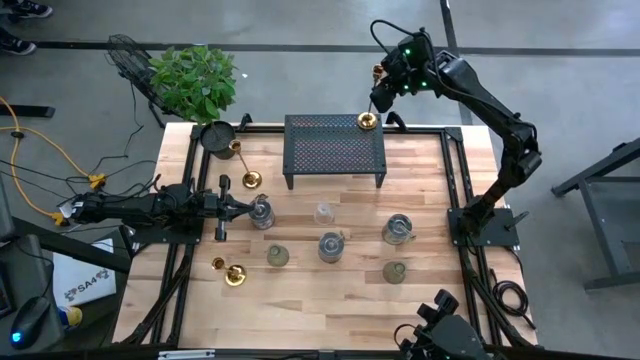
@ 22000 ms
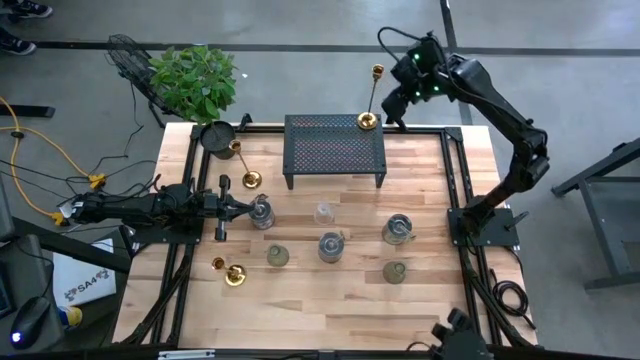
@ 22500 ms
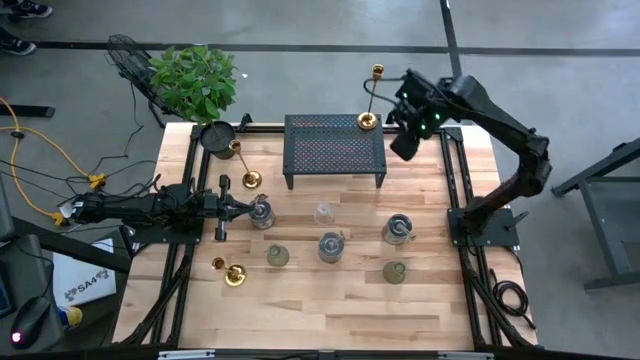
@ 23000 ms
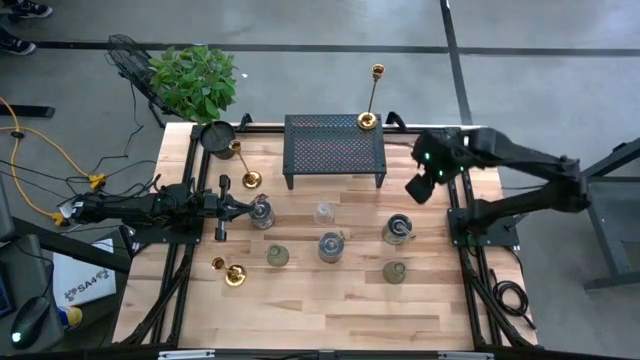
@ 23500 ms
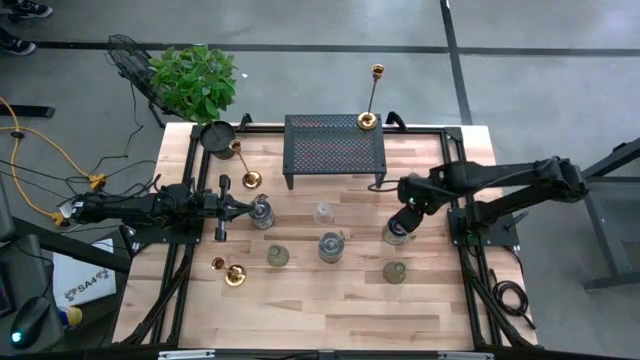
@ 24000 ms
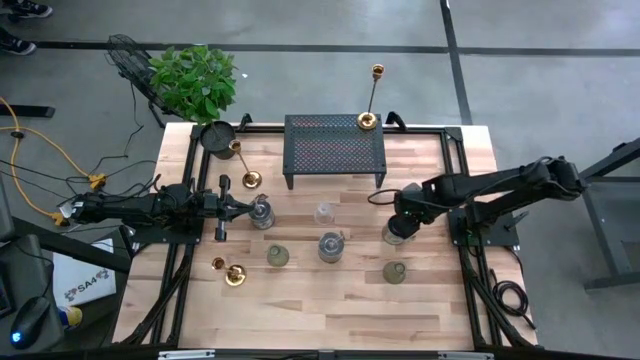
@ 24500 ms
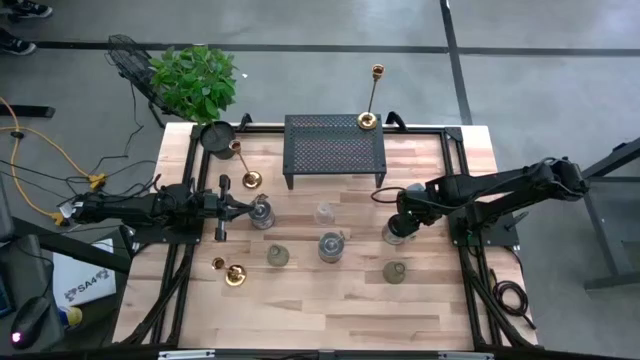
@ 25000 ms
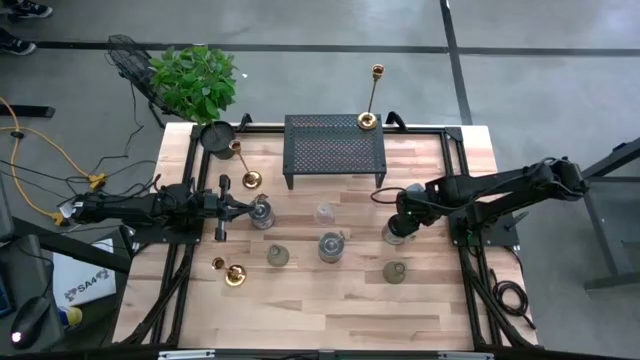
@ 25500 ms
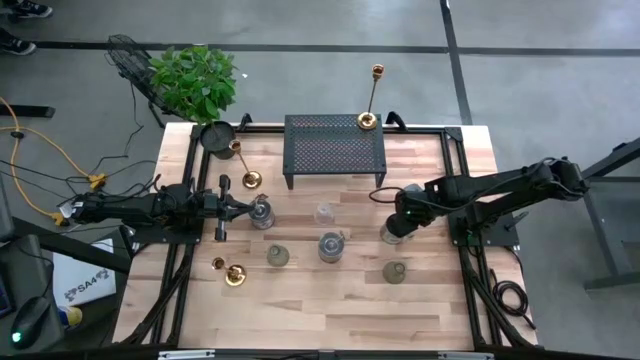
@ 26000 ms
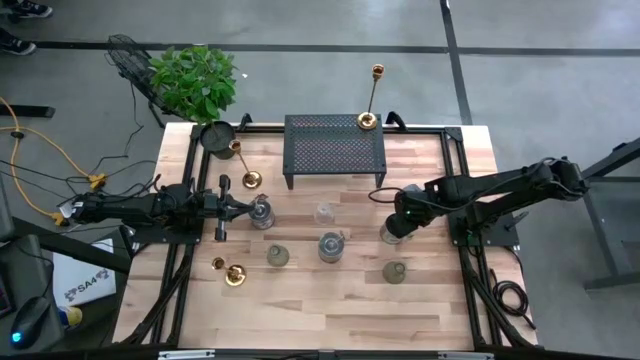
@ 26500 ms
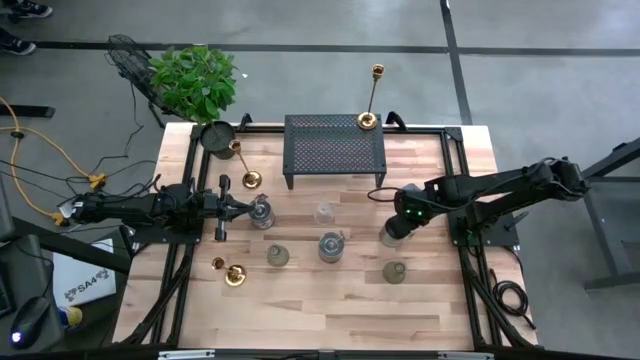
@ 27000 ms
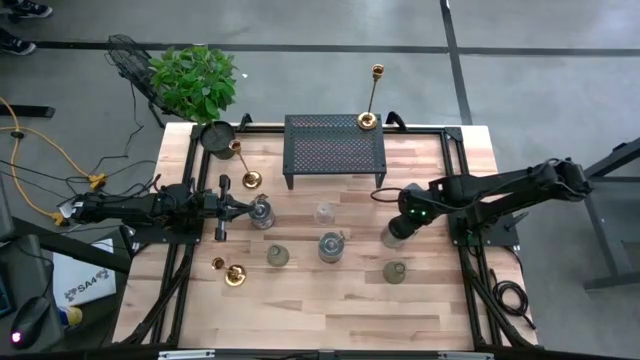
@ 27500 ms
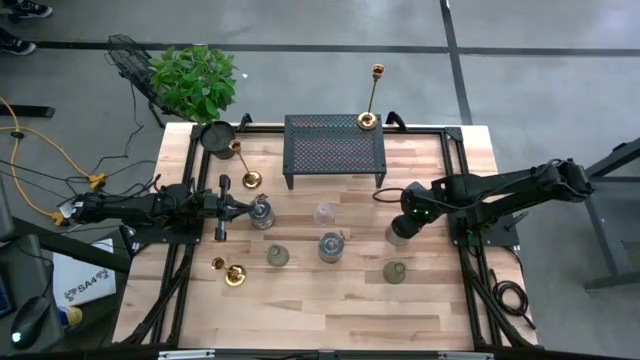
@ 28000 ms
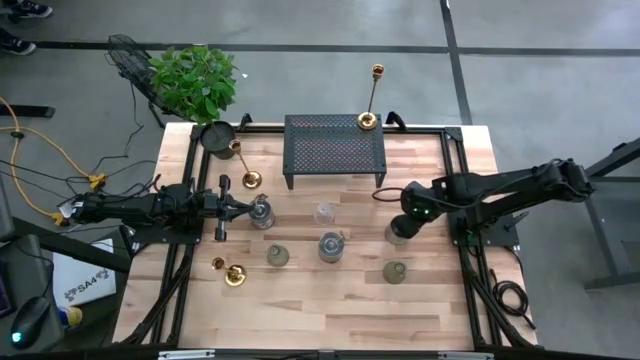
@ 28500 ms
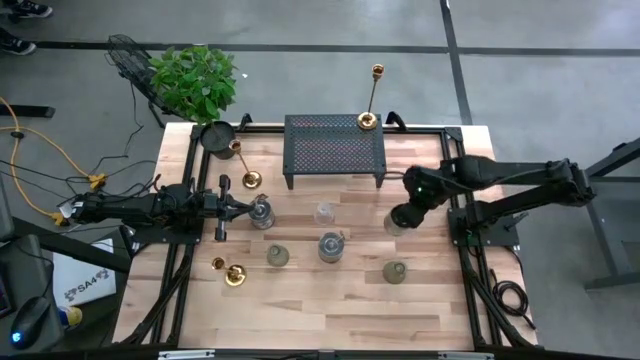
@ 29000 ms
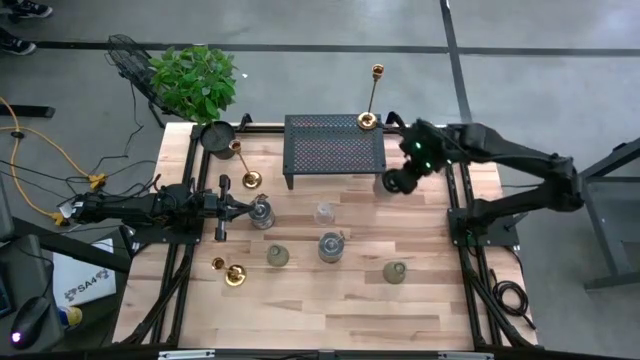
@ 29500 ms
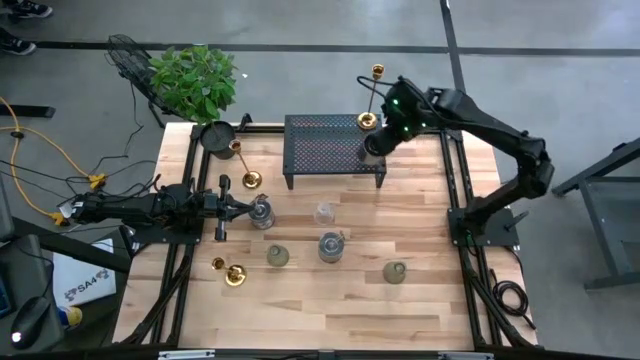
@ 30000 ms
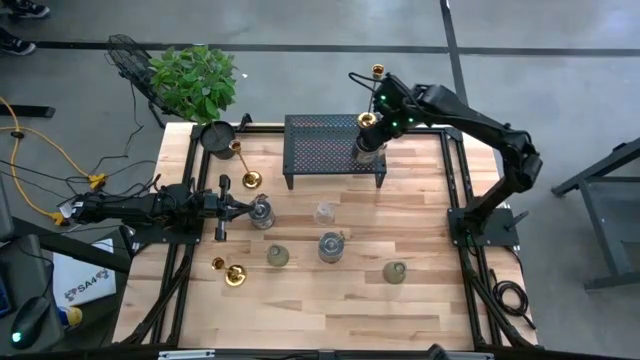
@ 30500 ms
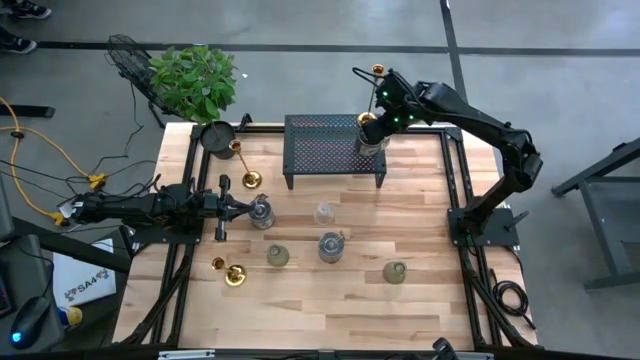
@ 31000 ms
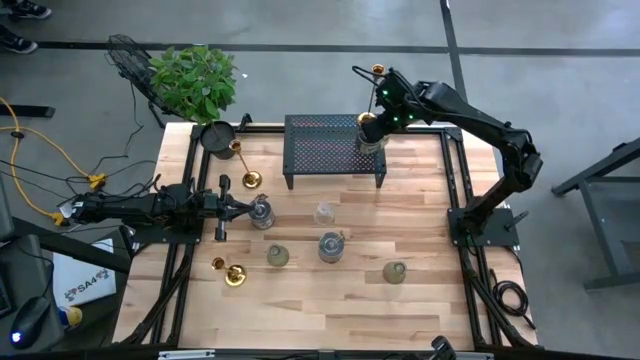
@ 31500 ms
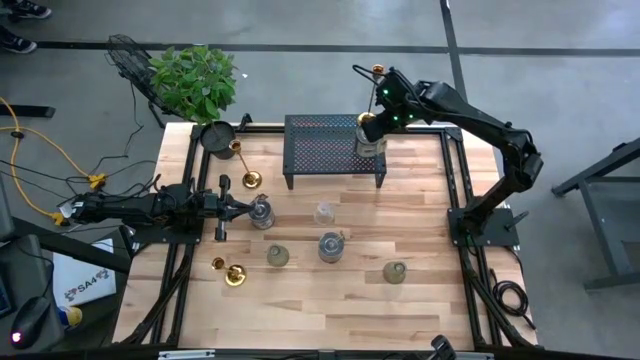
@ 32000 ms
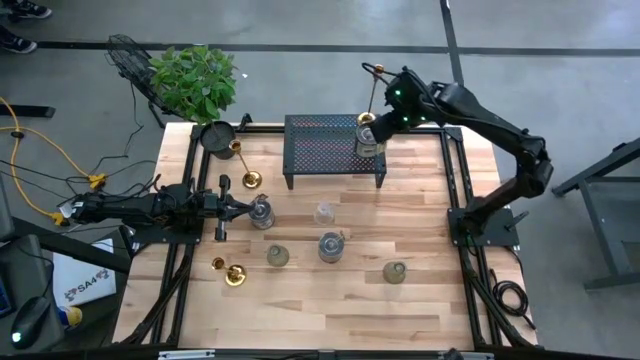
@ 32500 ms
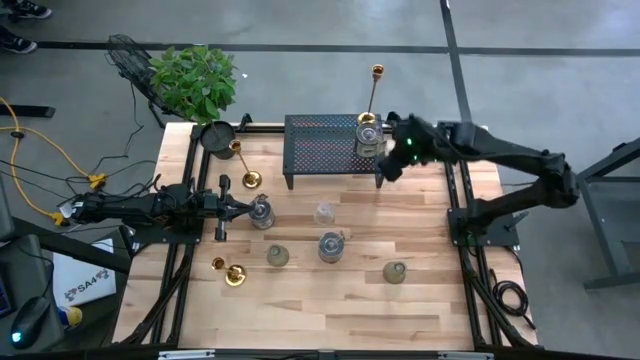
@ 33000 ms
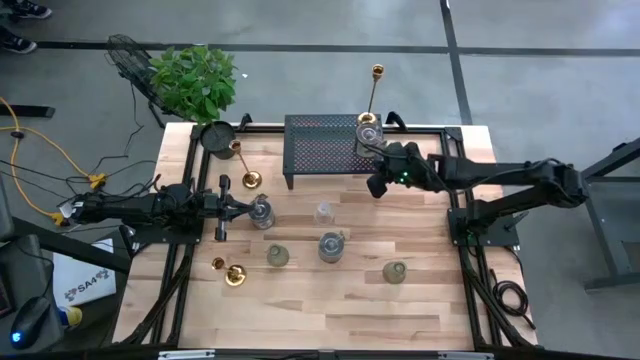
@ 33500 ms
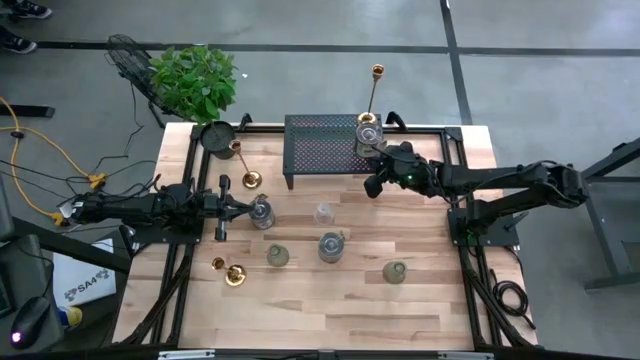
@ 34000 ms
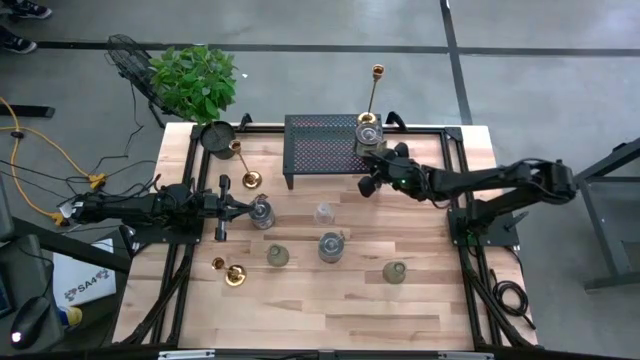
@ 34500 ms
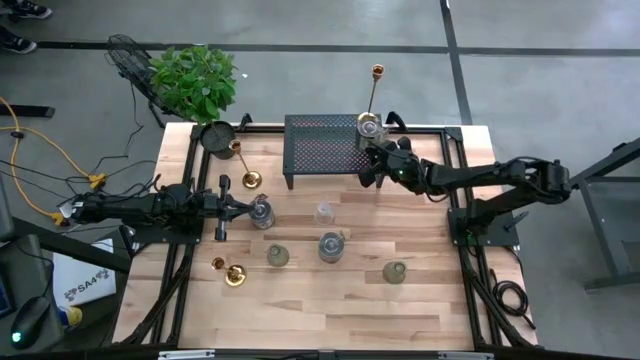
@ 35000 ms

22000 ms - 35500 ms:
Task: Pick & Place candle stick holders
Put the middle right silver scented candle on the shelf

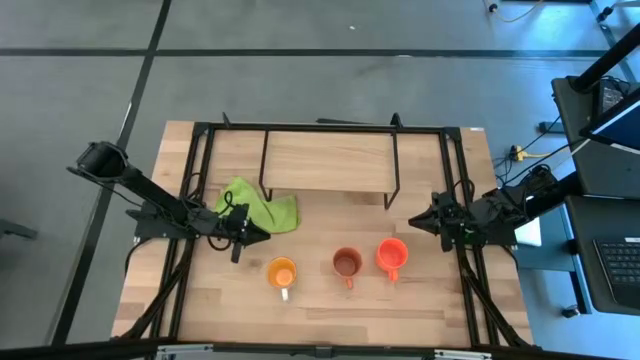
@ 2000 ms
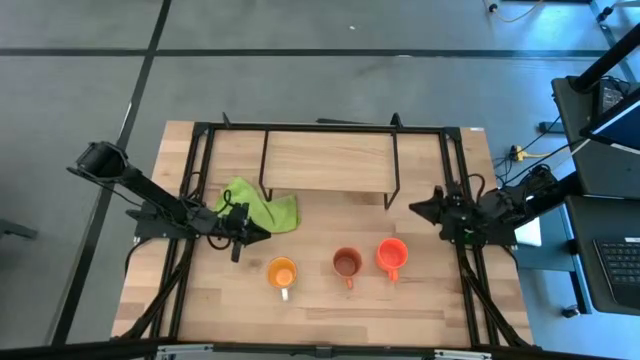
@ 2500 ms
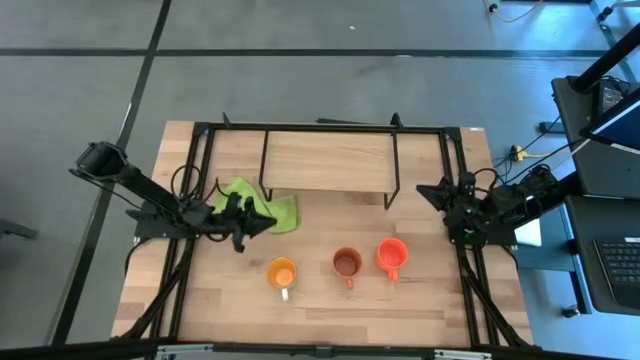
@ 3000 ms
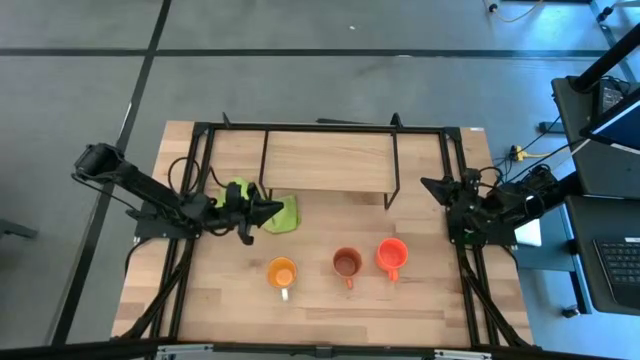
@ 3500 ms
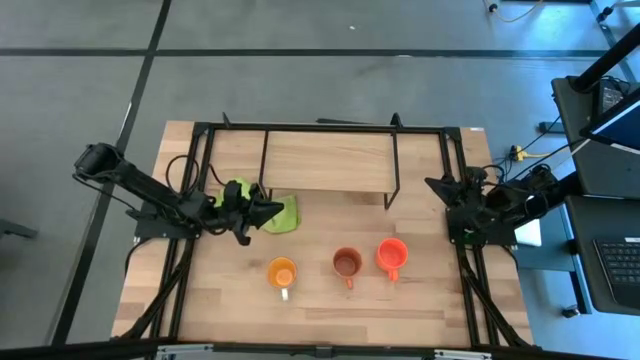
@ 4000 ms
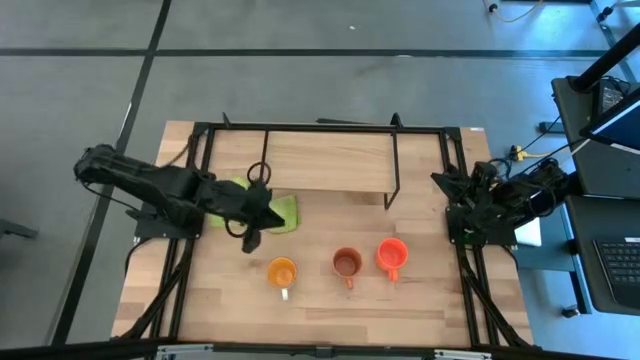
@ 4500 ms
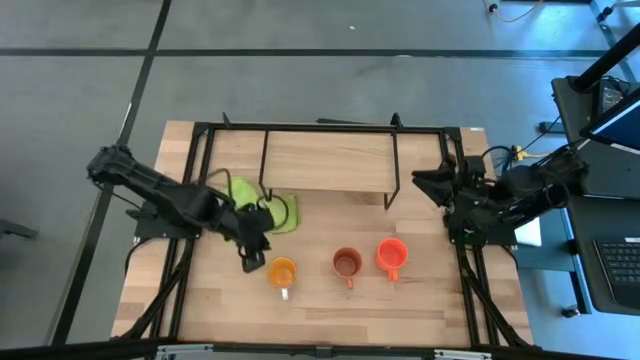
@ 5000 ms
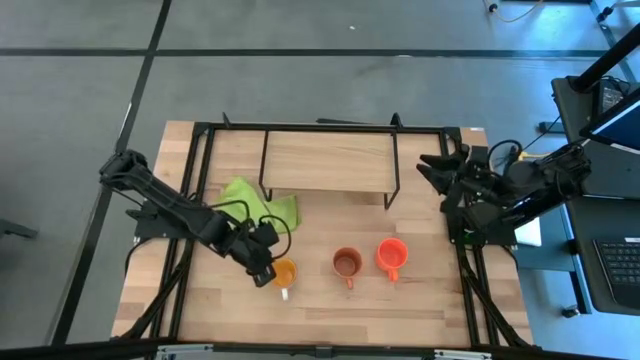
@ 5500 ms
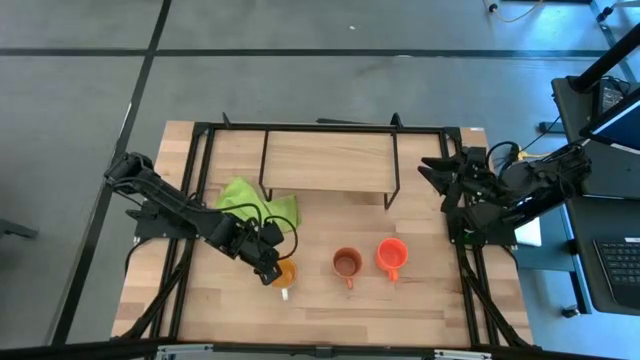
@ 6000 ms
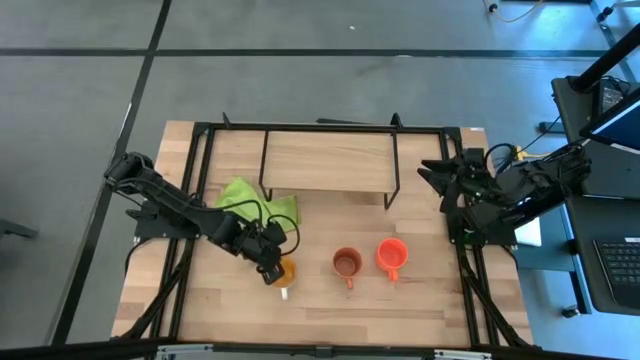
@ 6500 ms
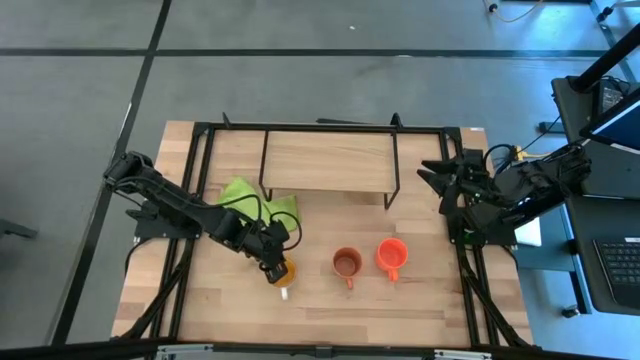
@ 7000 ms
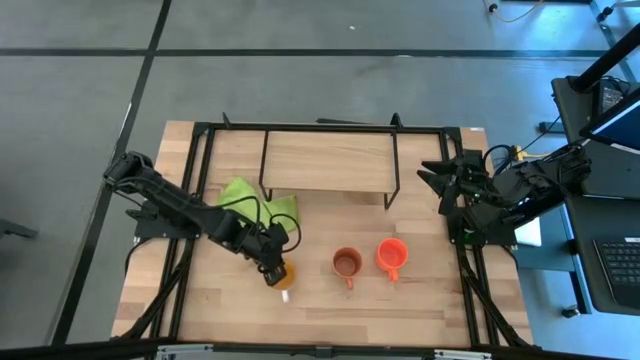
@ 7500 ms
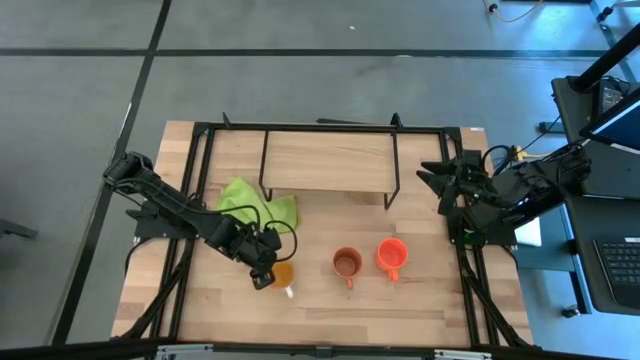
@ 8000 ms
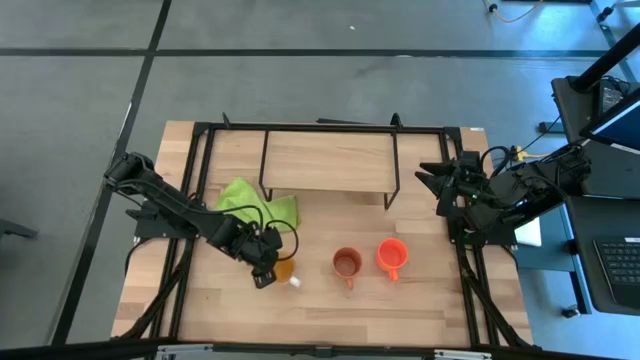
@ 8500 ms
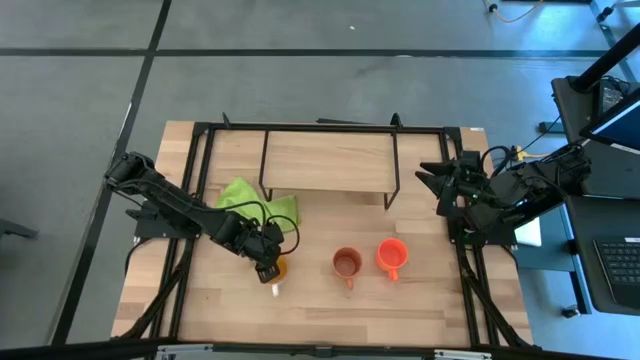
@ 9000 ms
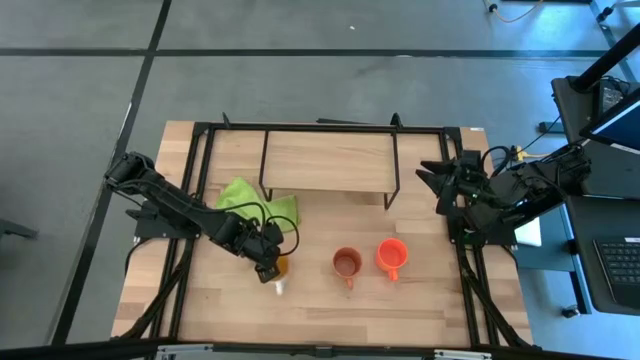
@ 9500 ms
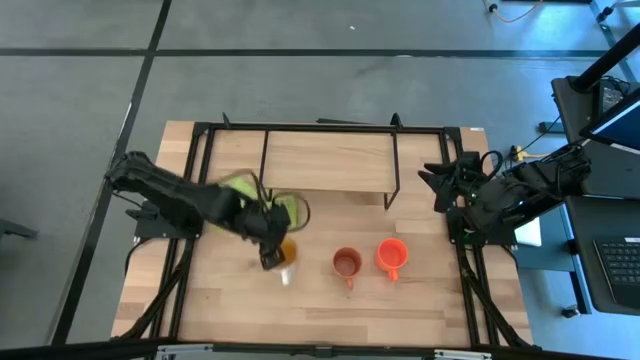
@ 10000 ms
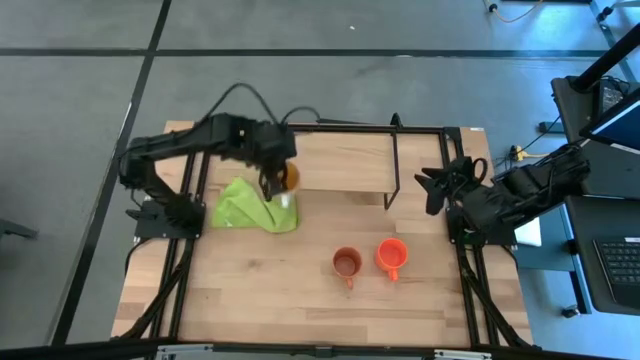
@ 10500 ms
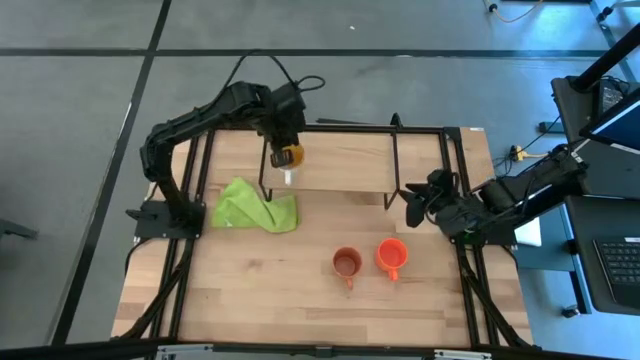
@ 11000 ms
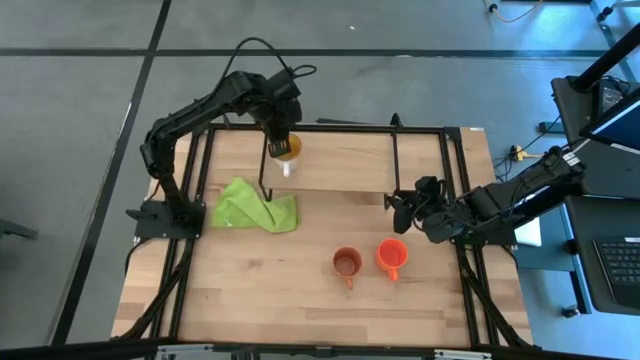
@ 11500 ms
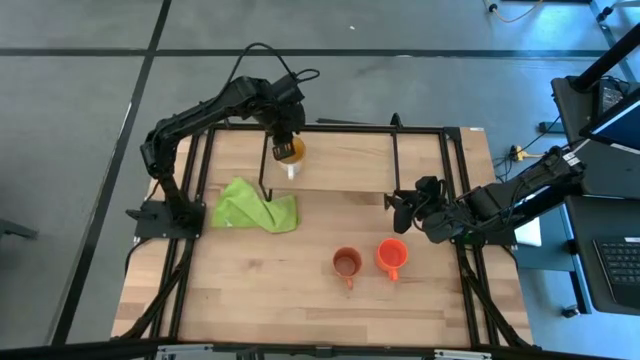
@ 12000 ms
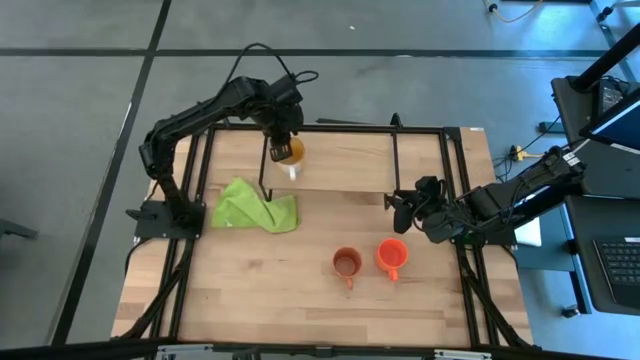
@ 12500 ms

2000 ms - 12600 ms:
Task: Stack small to large cups/mugs on shelf
Put the yellow mug on the shelf
